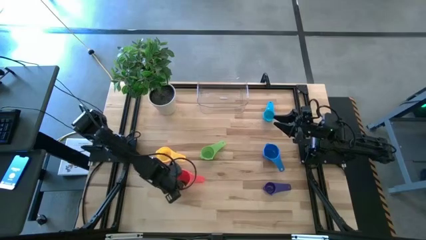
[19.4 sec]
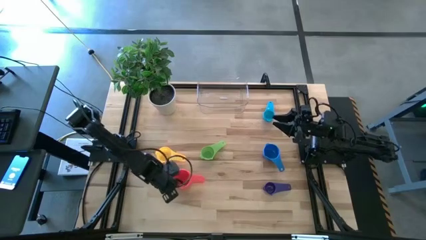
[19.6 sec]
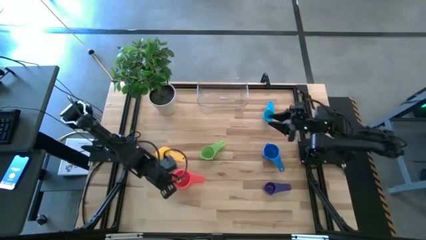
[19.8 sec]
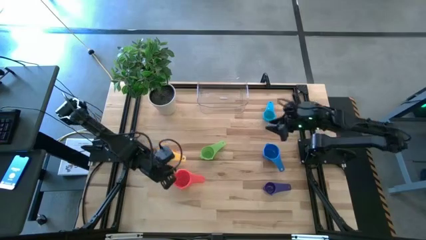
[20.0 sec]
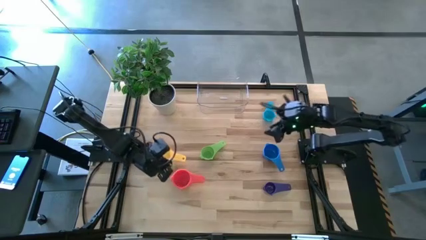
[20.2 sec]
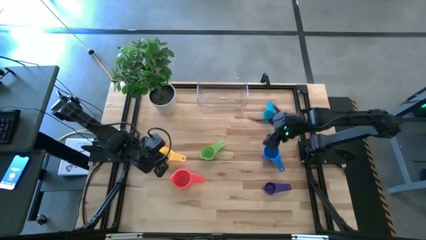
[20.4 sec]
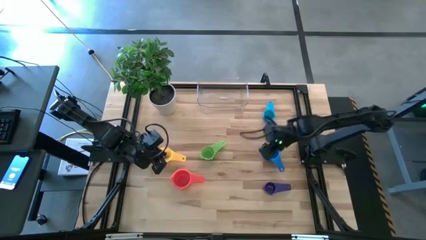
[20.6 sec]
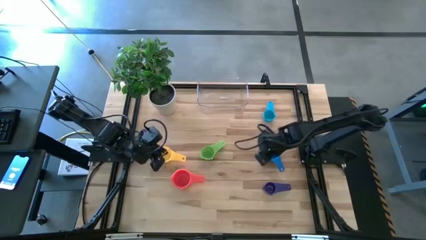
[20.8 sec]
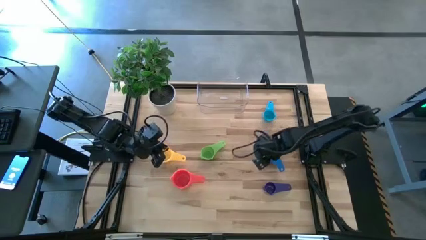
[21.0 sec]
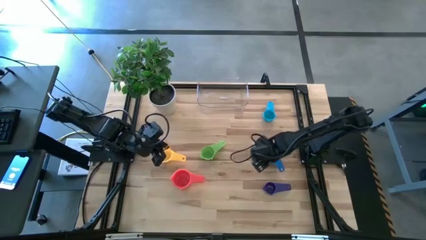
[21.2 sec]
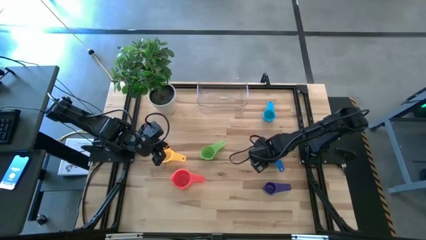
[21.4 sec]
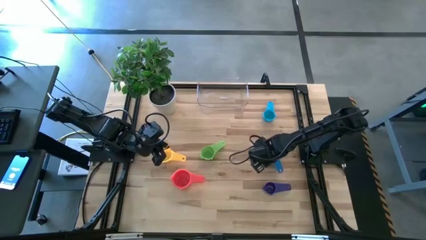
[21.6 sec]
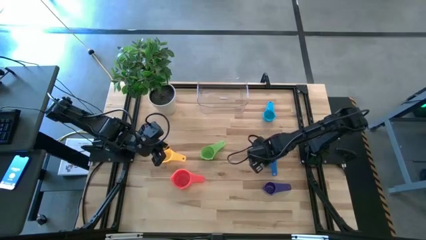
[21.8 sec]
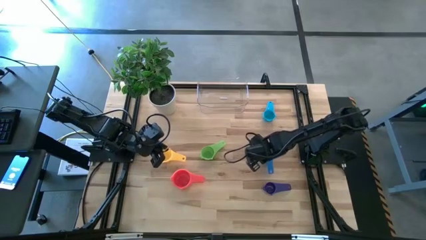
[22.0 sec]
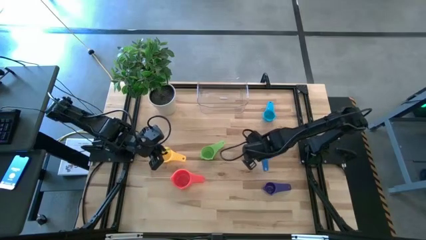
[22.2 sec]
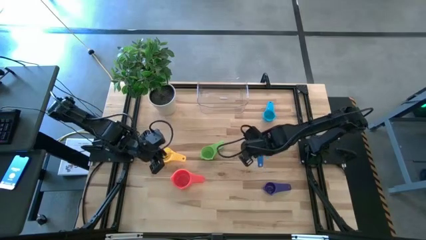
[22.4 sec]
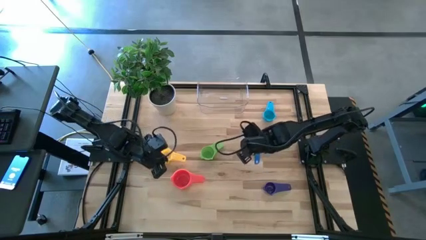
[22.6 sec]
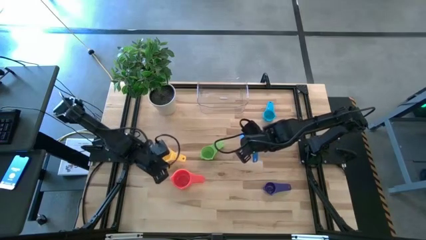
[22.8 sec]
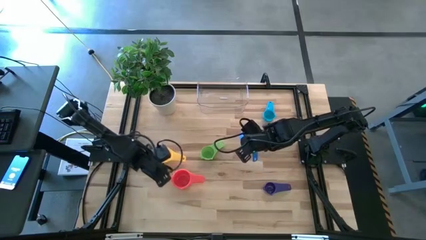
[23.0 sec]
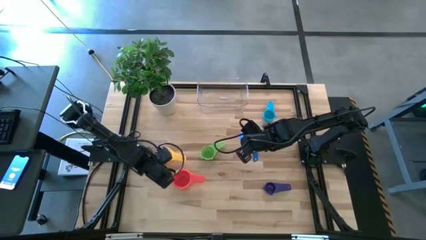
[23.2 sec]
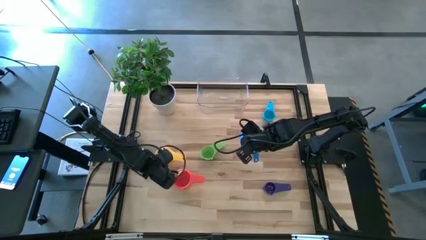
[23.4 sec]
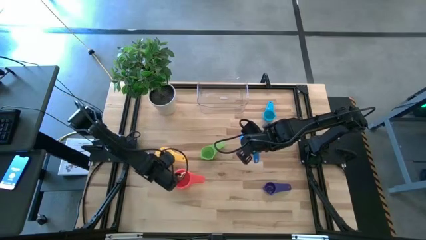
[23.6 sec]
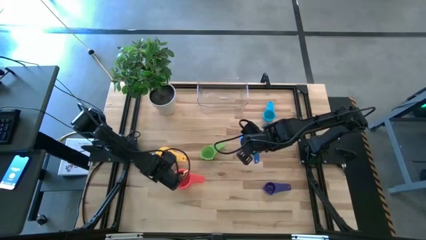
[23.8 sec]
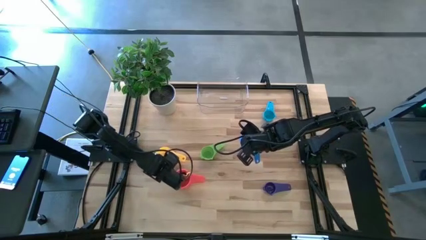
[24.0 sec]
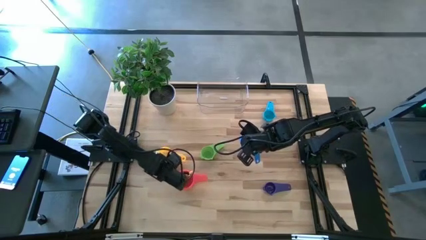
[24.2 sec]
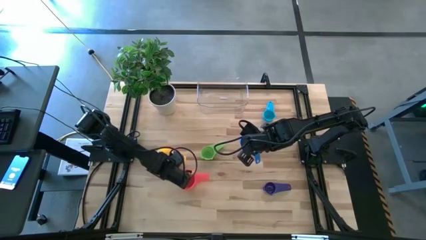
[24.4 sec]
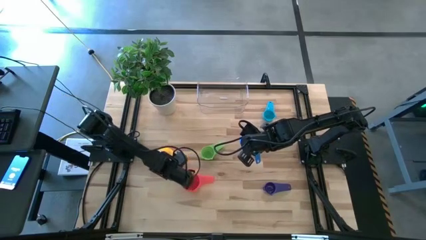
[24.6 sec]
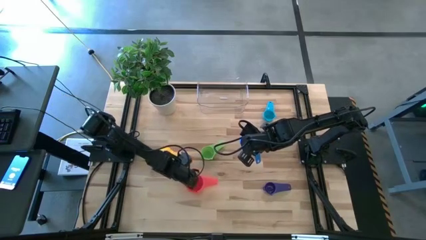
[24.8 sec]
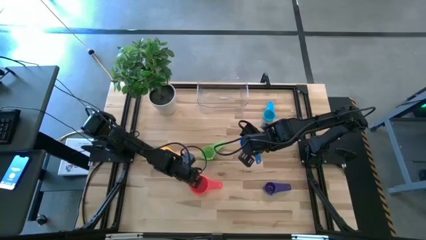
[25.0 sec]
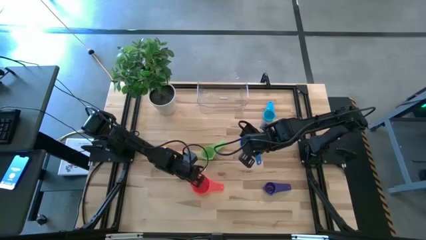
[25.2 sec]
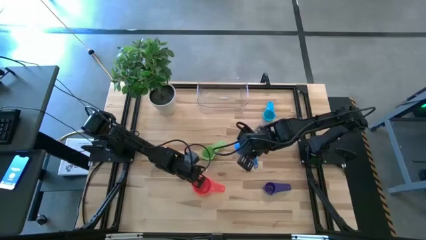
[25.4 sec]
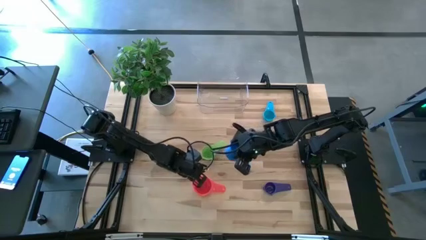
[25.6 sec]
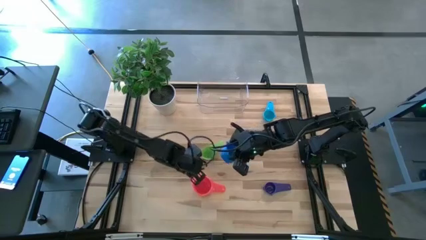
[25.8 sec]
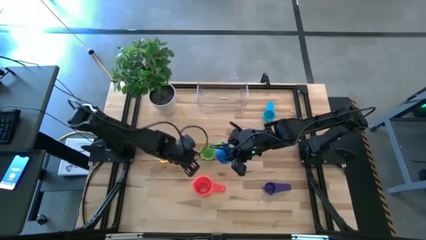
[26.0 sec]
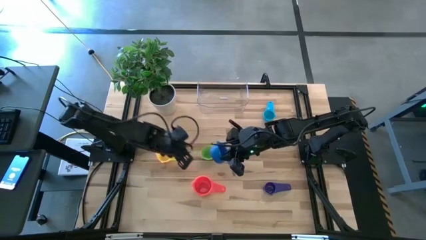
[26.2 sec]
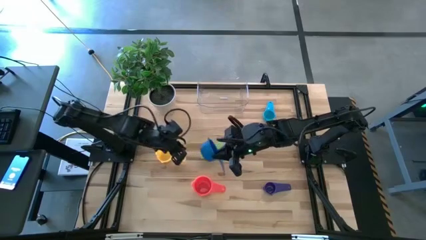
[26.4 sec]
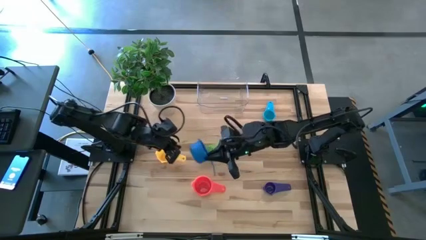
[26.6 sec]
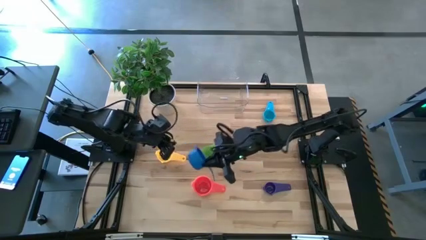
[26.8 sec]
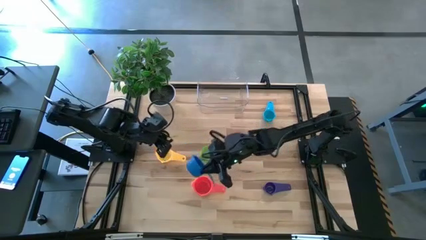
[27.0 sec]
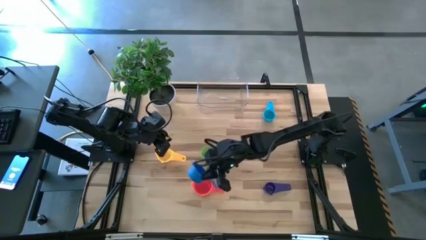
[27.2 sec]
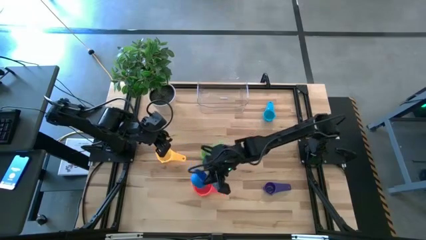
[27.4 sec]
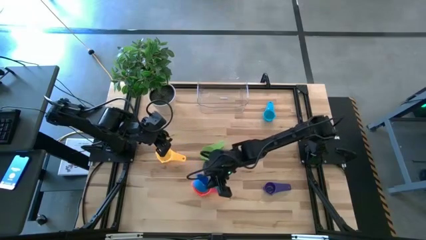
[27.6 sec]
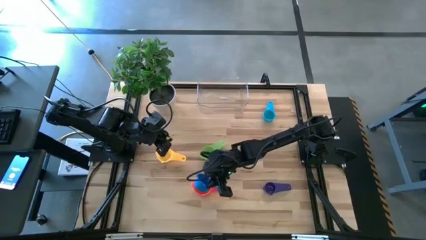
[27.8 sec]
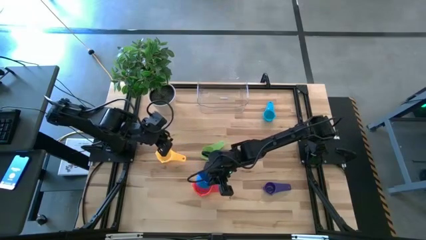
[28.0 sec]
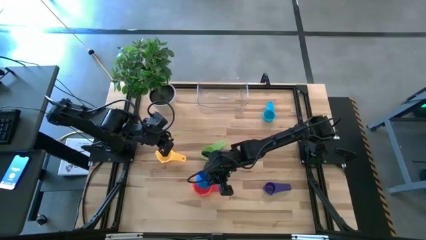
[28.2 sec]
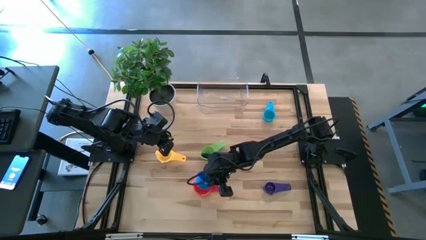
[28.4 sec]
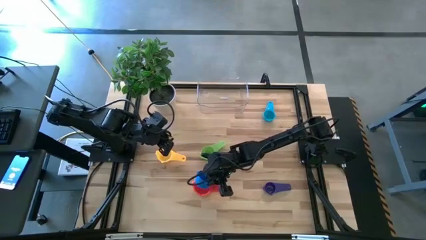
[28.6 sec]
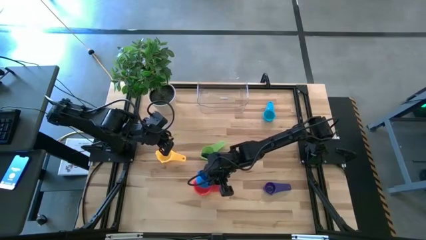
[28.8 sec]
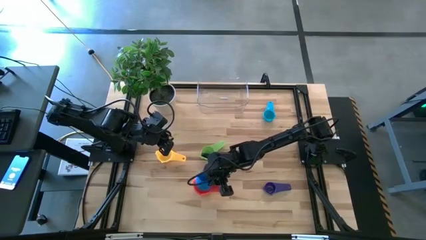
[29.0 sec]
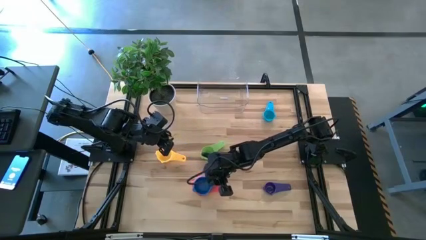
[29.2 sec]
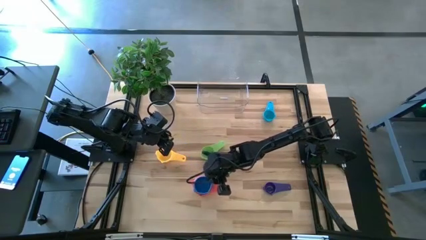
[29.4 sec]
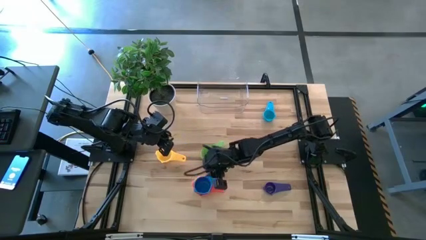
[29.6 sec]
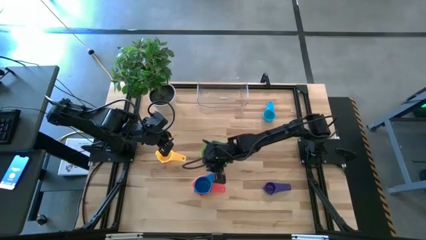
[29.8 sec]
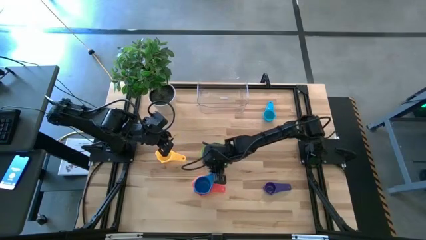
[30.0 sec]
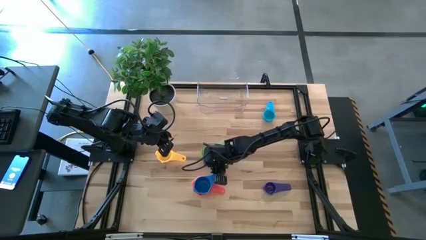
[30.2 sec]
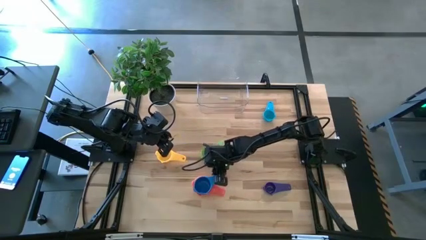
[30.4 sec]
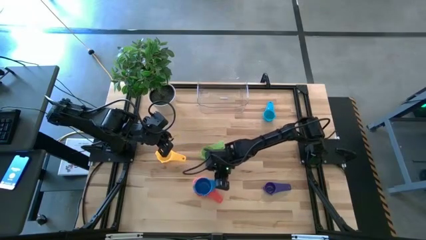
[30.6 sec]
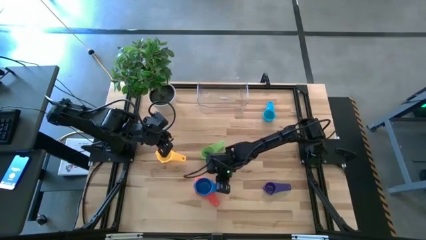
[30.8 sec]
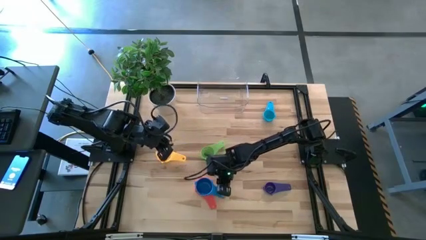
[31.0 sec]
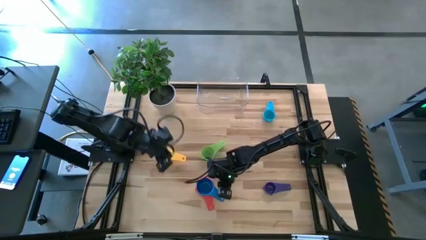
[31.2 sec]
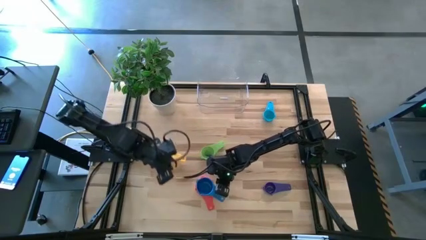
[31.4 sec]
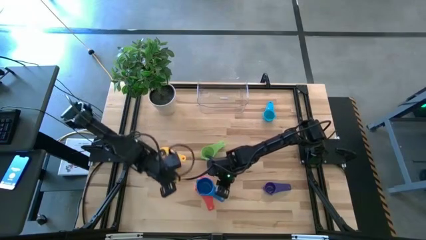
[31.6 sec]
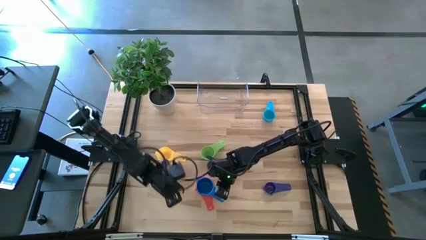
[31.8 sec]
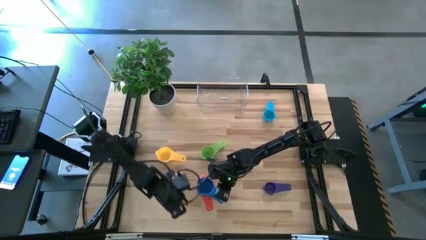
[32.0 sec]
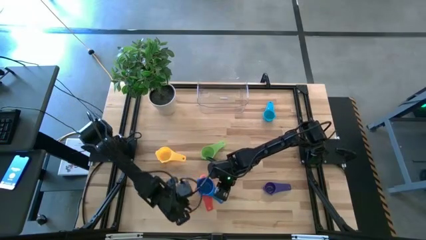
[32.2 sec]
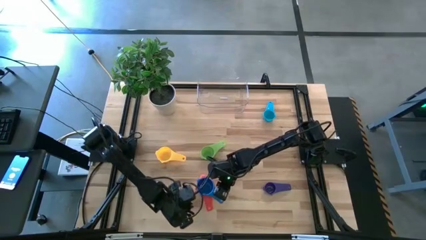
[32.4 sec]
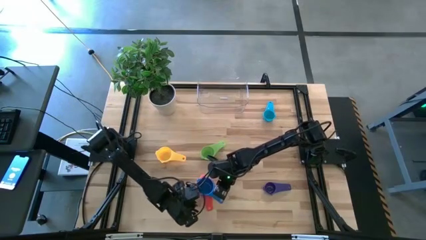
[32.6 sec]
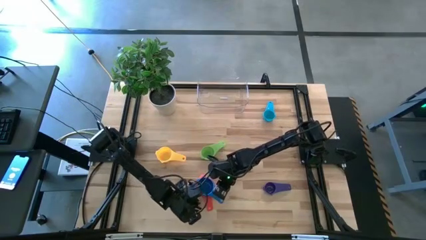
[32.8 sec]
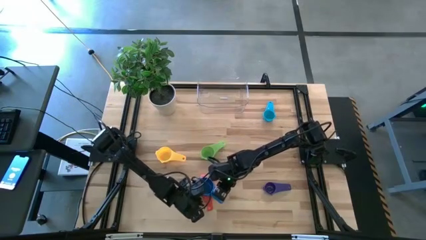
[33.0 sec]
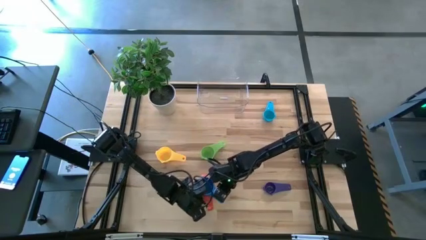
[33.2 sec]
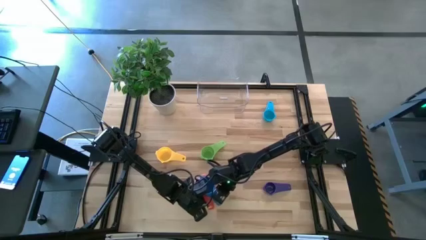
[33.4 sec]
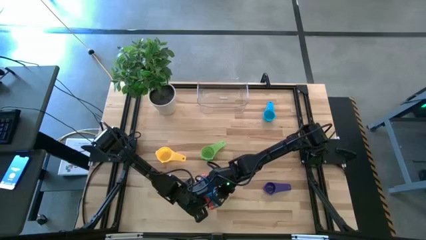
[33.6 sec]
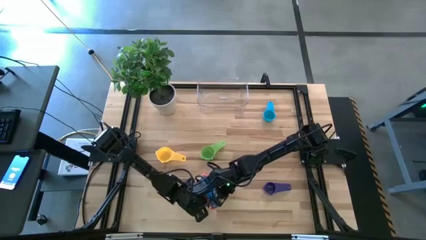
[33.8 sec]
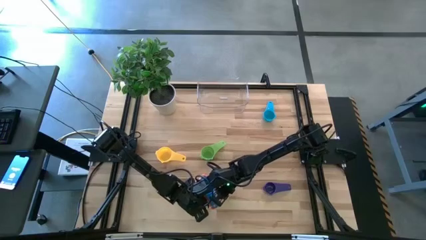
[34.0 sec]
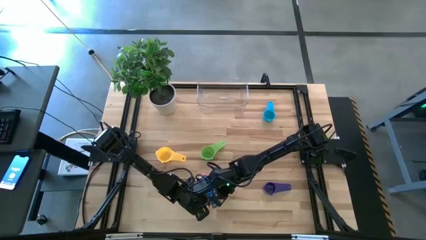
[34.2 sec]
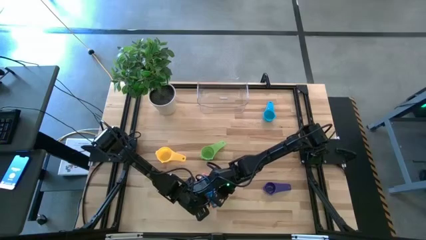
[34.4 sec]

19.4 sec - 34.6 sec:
Task: Nest measuring cups in basket
Stack the blue measuring cup on top of the red measuring cup
